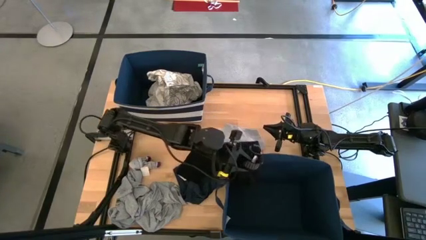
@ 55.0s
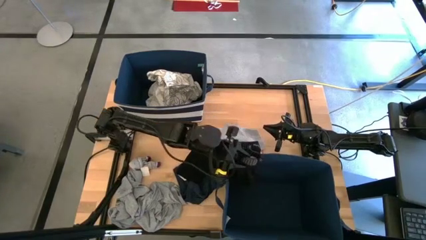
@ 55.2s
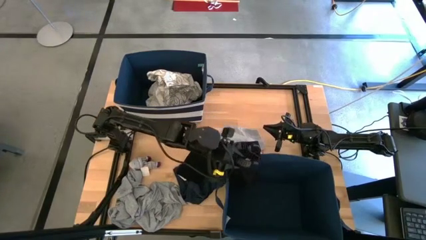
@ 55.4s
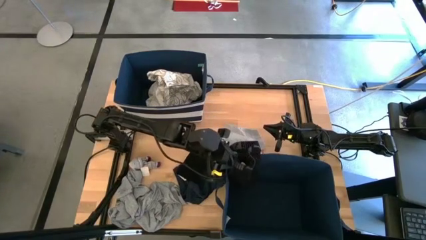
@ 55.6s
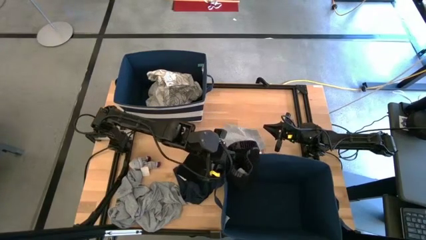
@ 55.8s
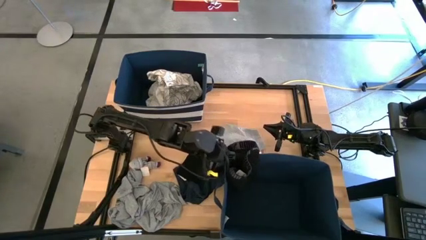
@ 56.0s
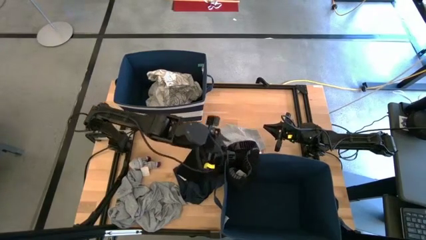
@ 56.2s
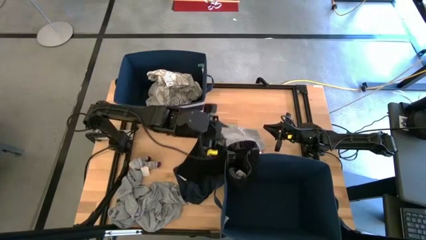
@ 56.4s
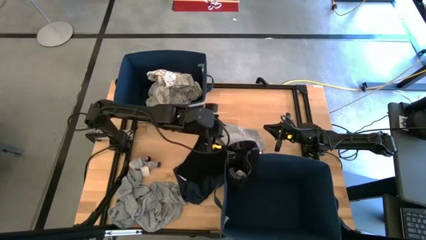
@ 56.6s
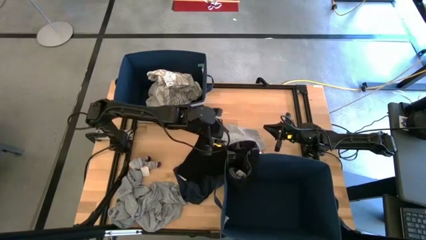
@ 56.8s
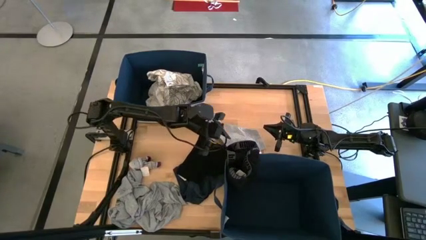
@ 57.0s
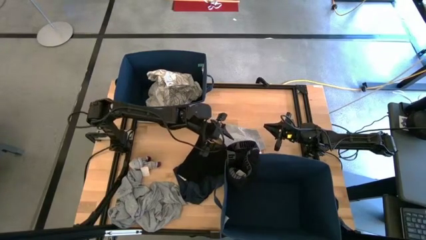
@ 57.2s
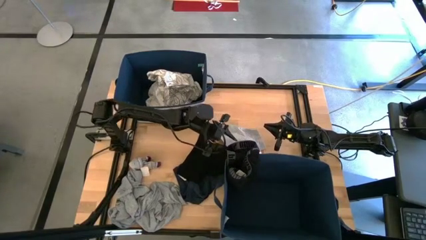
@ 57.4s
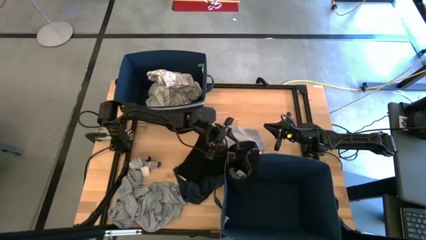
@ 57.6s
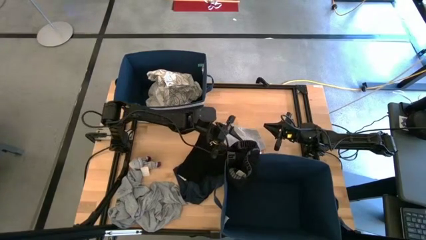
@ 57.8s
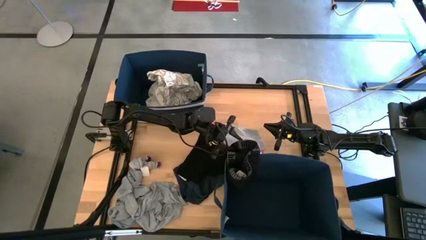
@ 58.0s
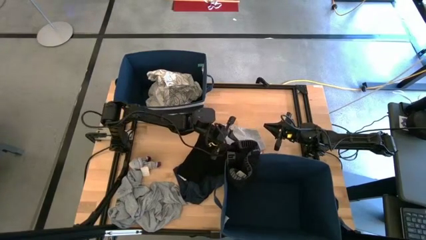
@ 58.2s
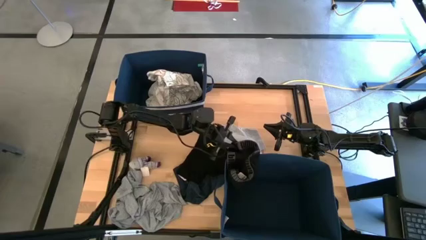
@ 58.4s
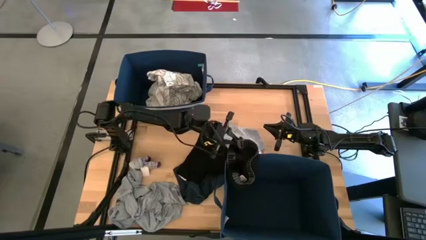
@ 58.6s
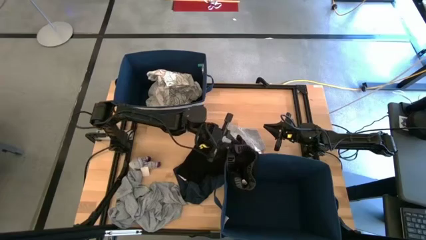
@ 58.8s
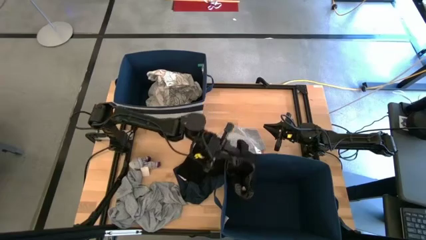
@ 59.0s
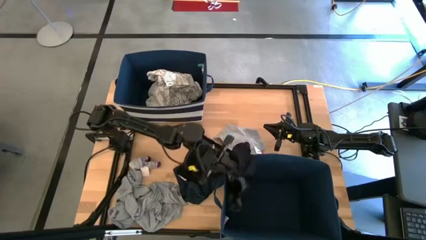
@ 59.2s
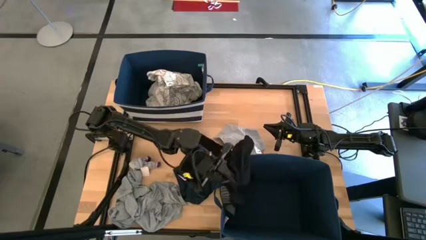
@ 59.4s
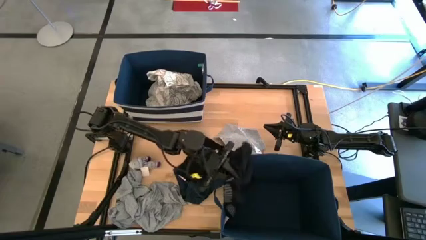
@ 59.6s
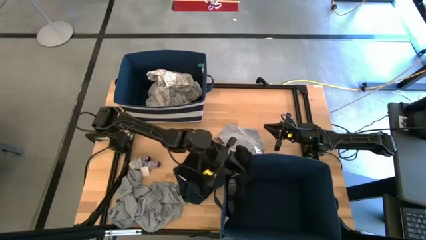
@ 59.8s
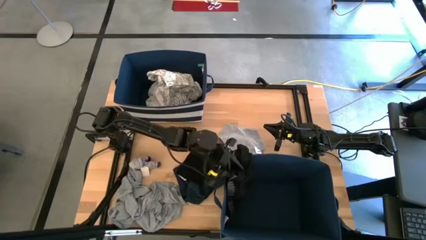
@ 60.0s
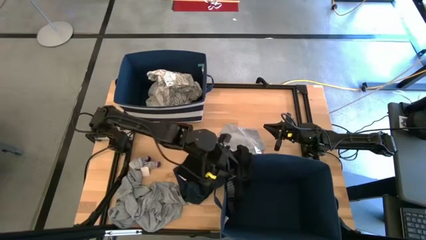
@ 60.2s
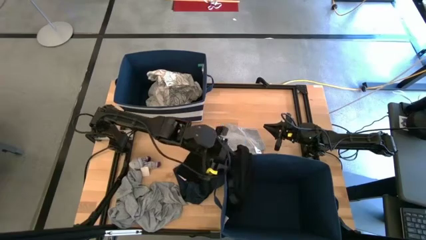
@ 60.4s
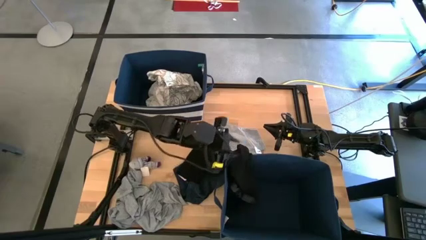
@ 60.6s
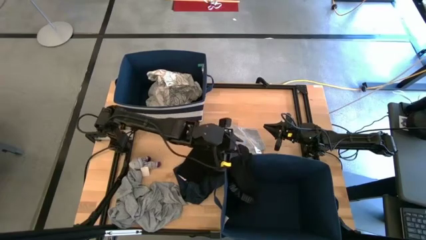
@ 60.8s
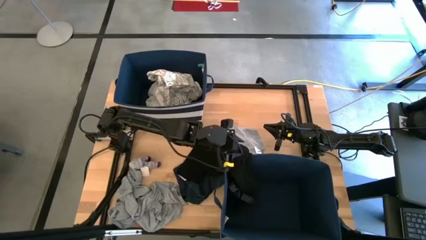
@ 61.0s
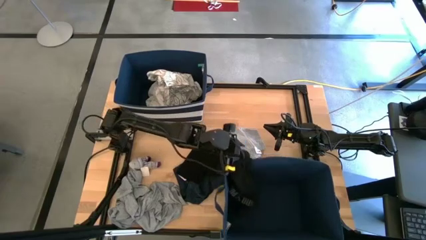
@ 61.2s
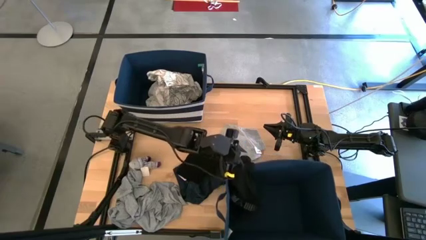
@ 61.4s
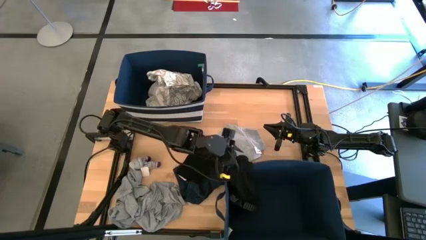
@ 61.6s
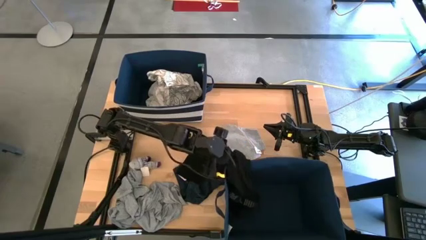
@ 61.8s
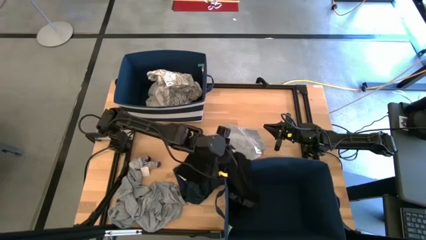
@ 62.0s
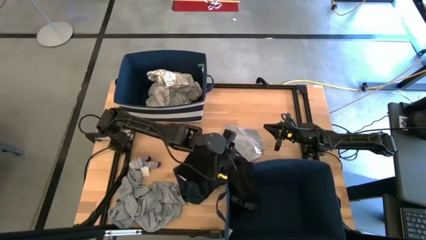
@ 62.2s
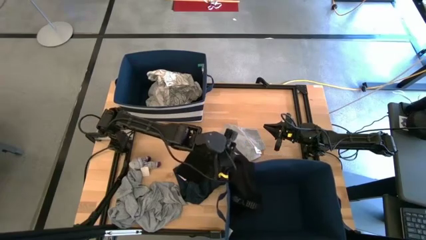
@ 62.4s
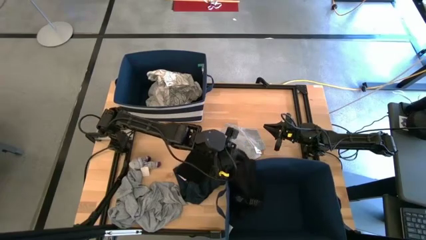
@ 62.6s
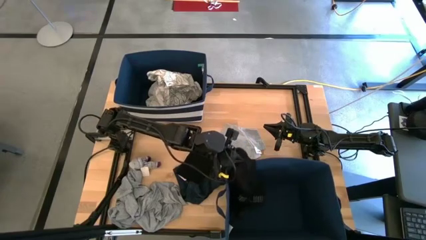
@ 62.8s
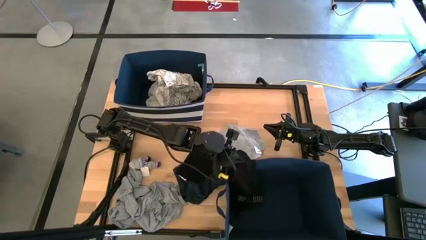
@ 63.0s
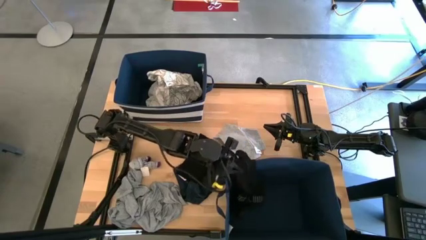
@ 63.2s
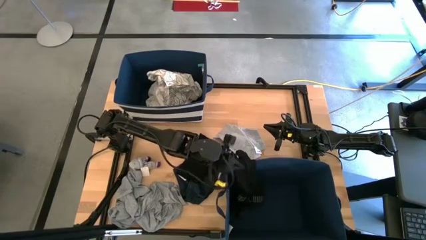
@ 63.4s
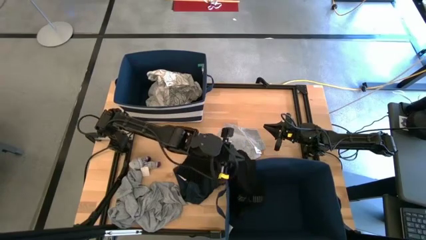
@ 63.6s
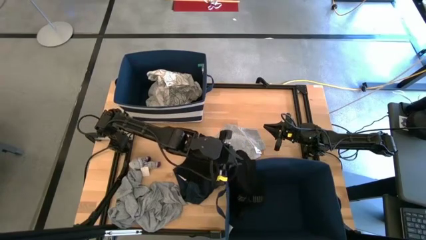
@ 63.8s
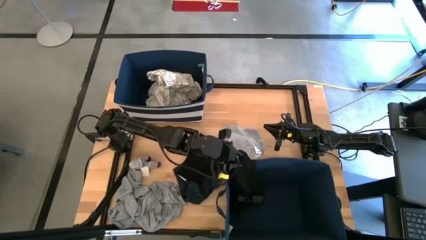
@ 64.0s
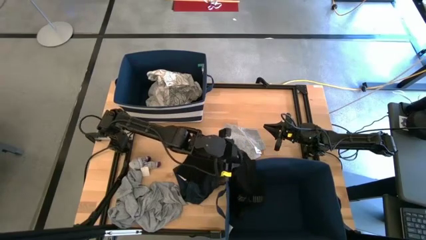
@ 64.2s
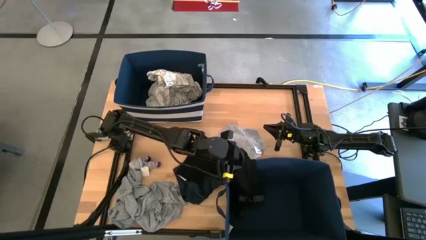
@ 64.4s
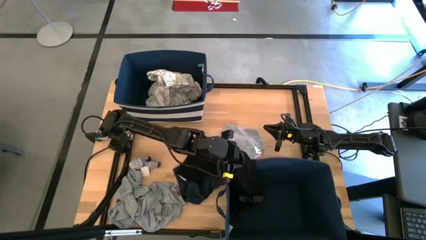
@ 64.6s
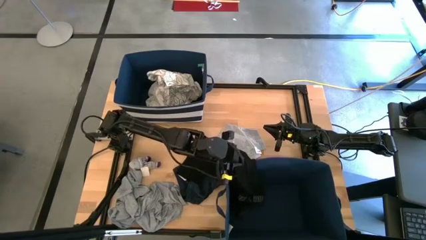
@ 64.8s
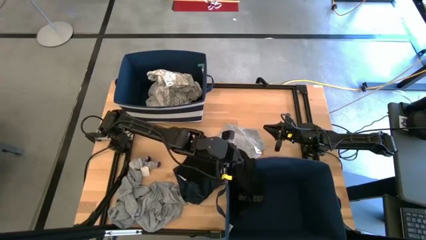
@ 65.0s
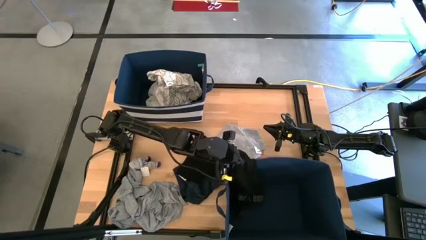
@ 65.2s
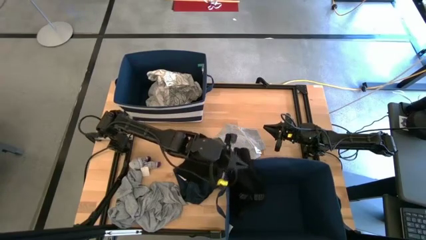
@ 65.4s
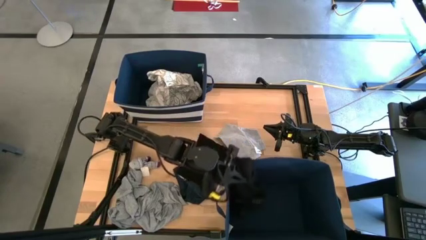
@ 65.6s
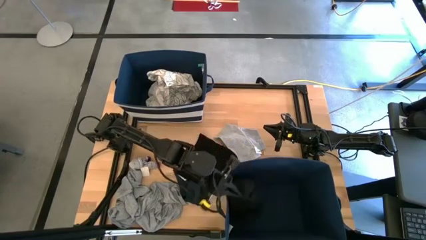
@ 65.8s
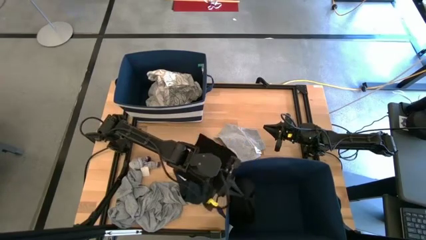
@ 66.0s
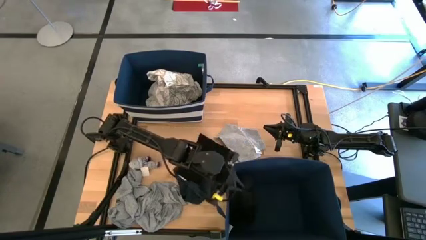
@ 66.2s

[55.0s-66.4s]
Task: Sort clothes
Put the black boxer into the bottom blue laundry organizer

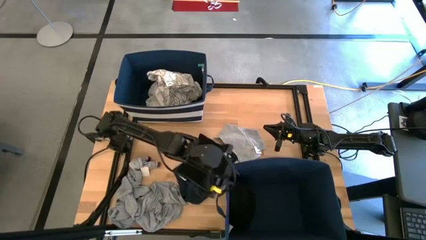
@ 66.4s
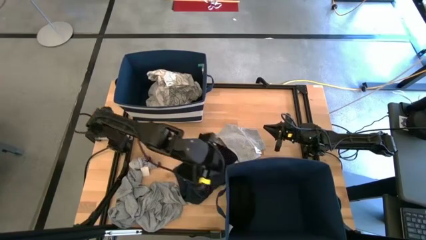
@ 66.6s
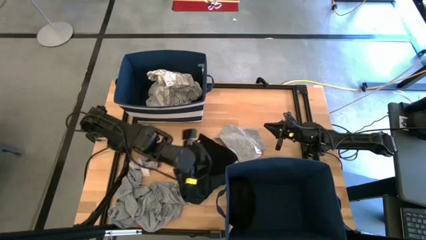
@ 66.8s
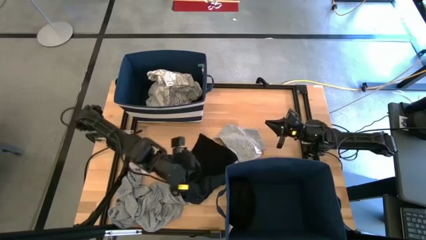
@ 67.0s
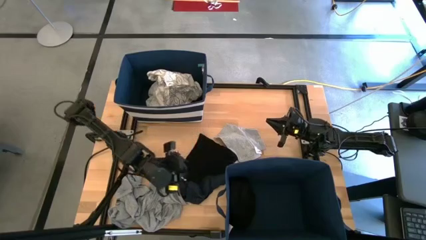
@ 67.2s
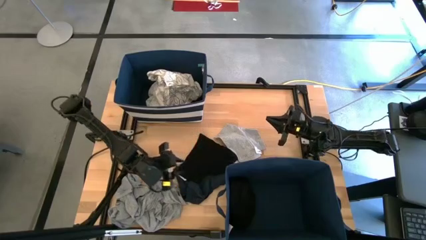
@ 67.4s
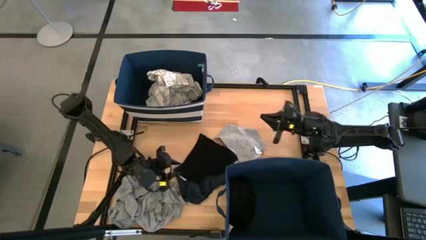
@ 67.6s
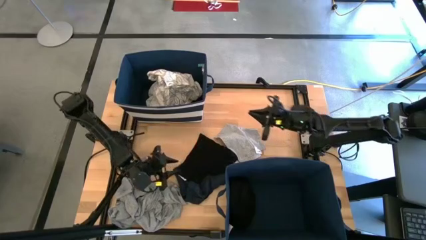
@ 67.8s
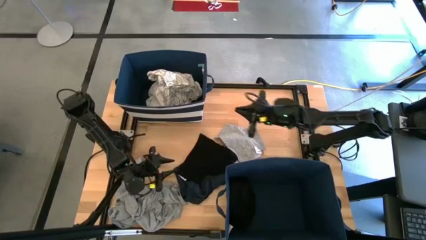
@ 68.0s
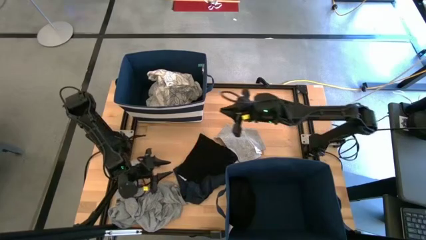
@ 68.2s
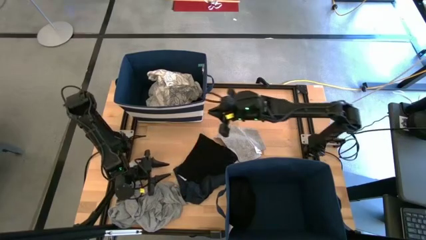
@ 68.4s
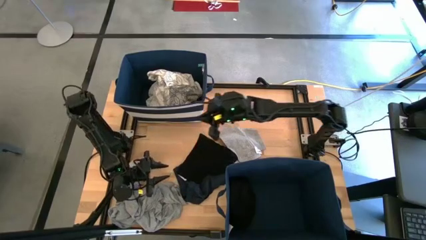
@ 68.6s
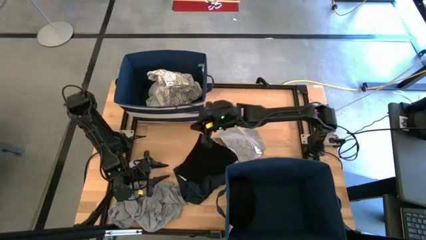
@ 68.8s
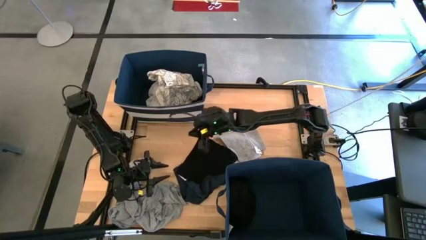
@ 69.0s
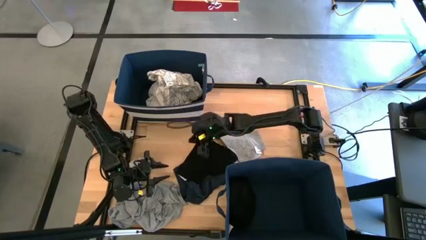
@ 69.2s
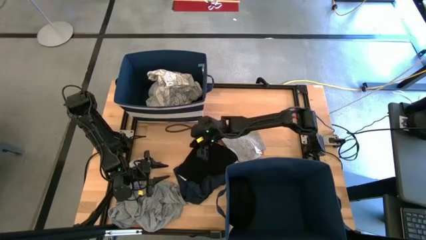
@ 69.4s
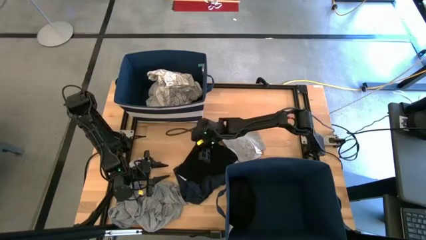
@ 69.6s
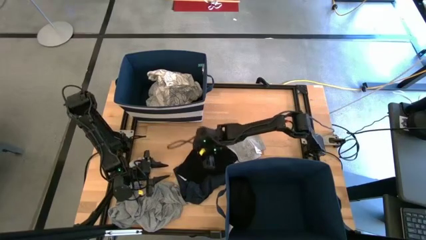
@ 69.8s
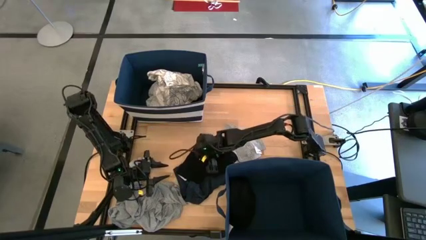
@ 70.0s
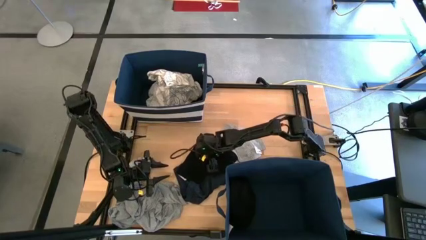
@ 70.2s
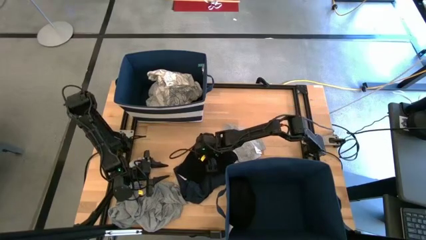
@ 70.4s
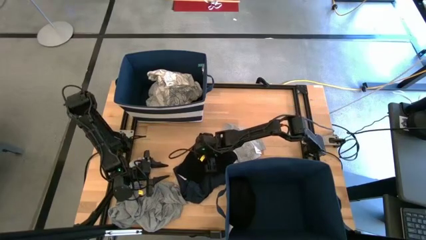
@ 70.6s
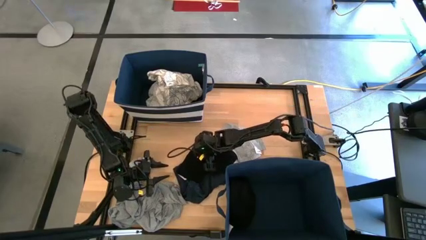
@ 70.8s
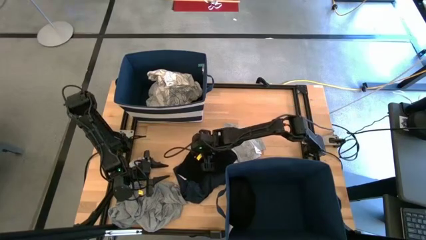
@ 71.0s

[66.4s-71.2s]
Put the black boxer into the bottom blue laundry organizer
